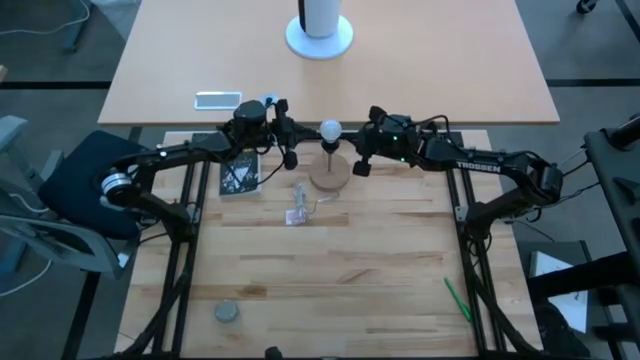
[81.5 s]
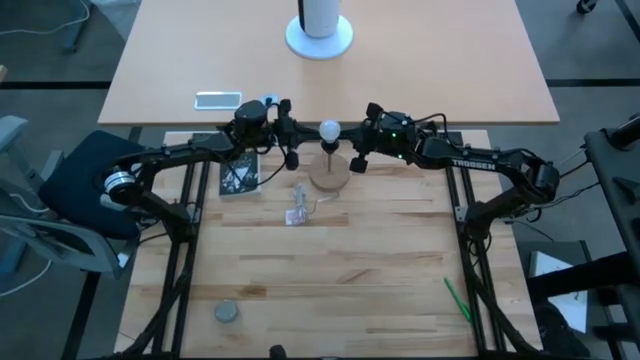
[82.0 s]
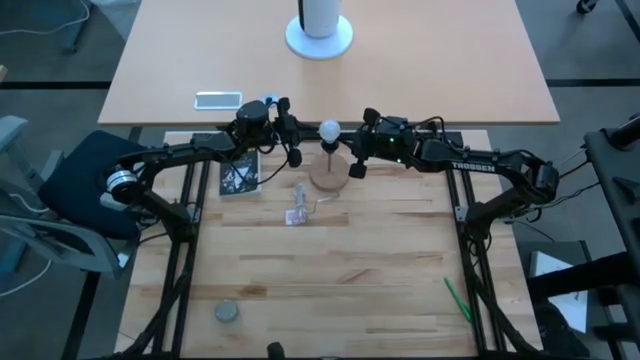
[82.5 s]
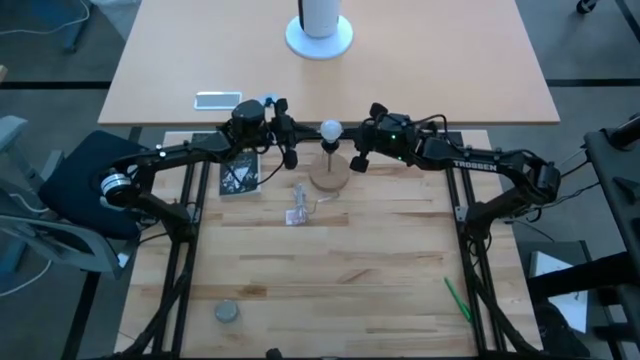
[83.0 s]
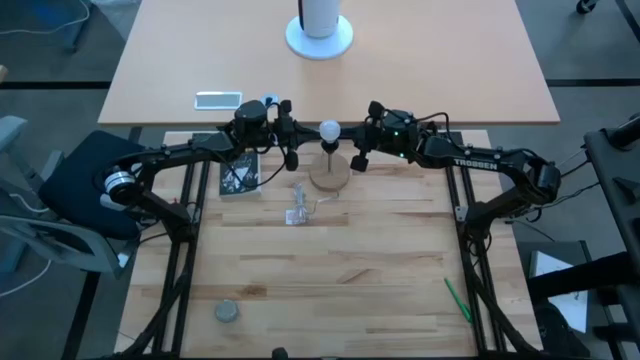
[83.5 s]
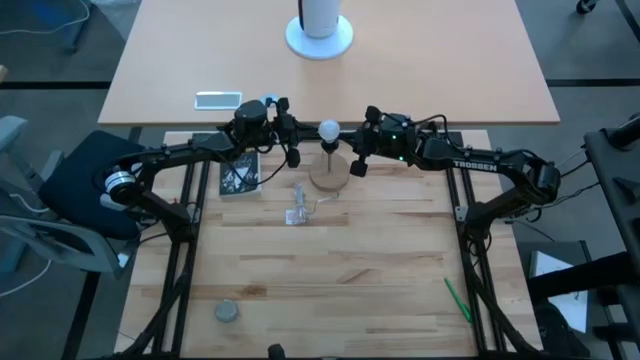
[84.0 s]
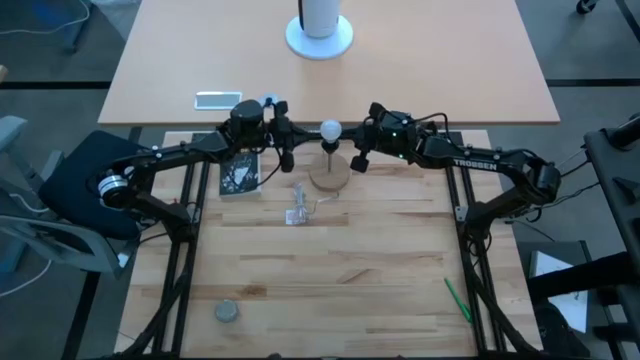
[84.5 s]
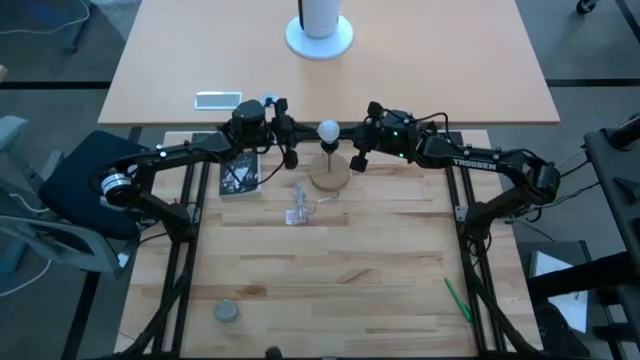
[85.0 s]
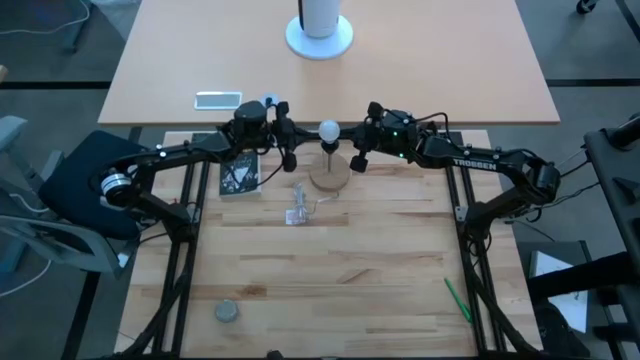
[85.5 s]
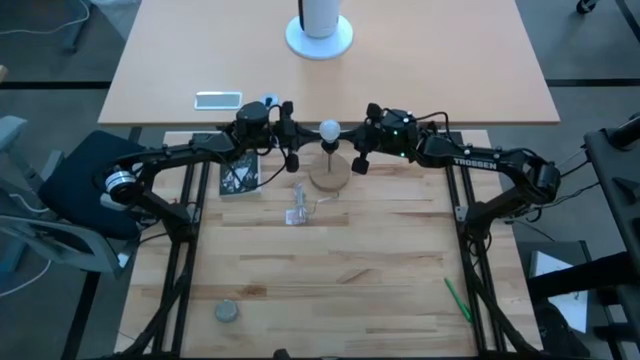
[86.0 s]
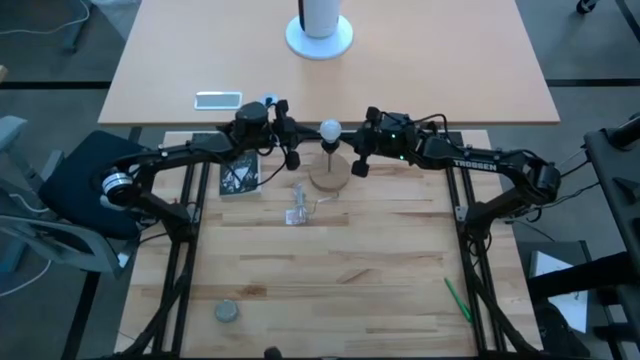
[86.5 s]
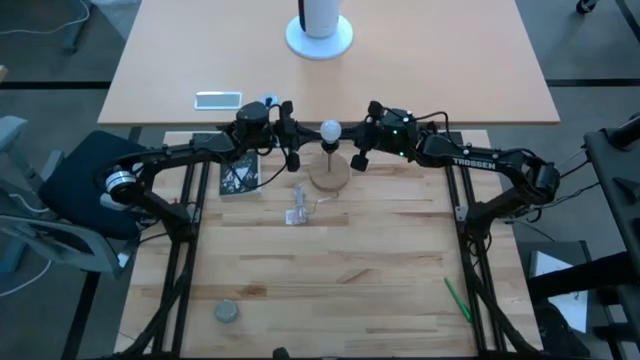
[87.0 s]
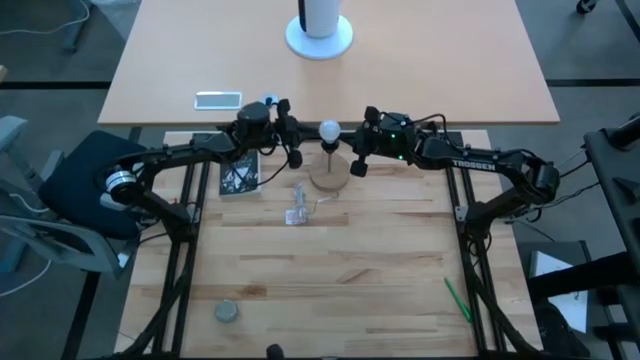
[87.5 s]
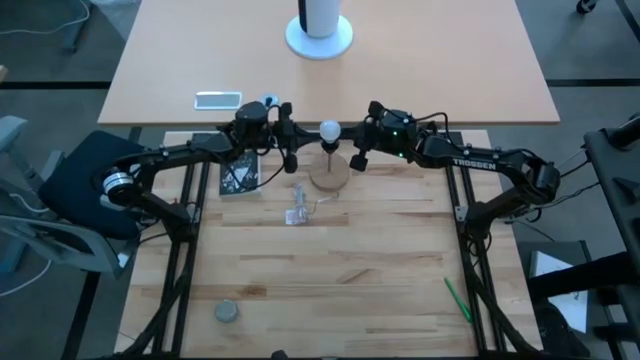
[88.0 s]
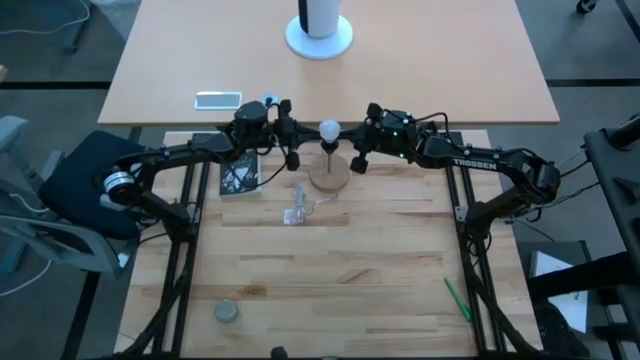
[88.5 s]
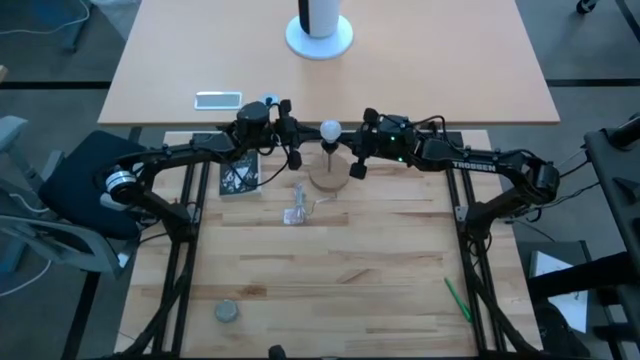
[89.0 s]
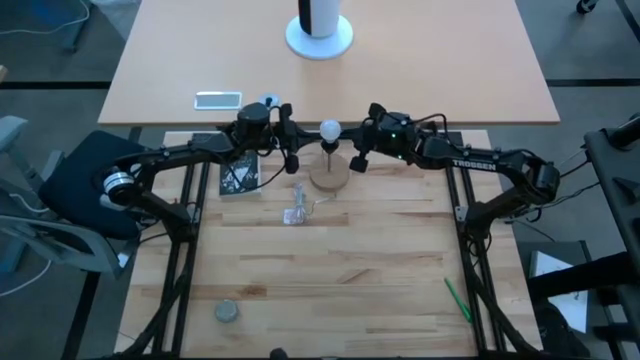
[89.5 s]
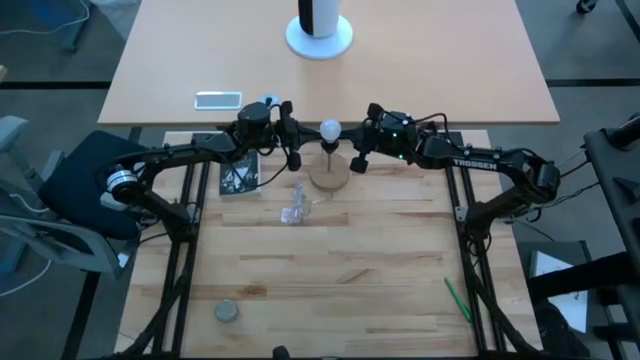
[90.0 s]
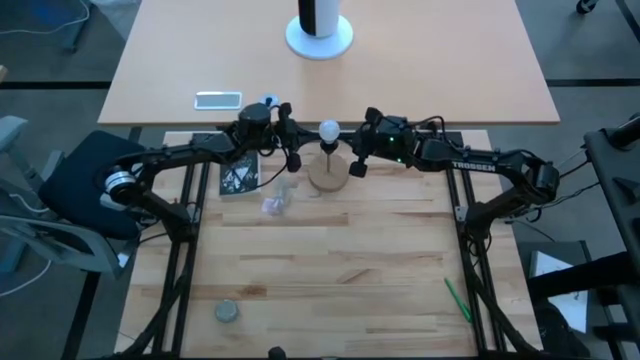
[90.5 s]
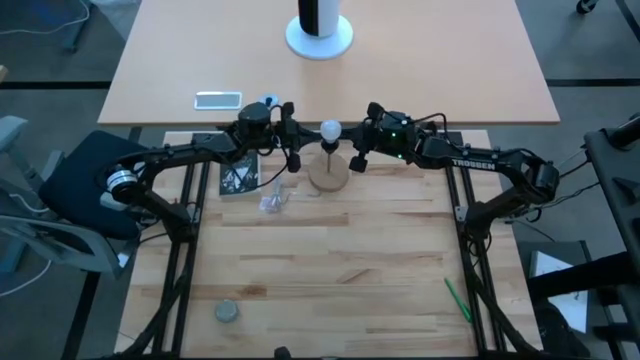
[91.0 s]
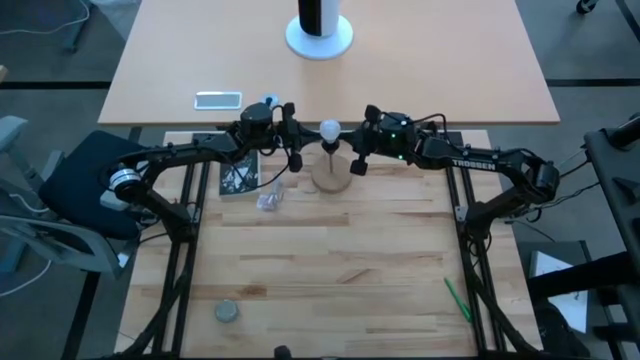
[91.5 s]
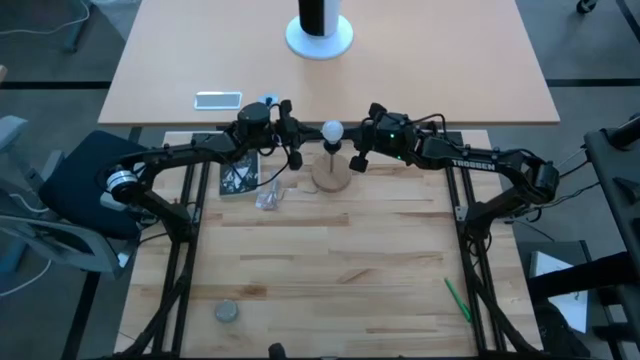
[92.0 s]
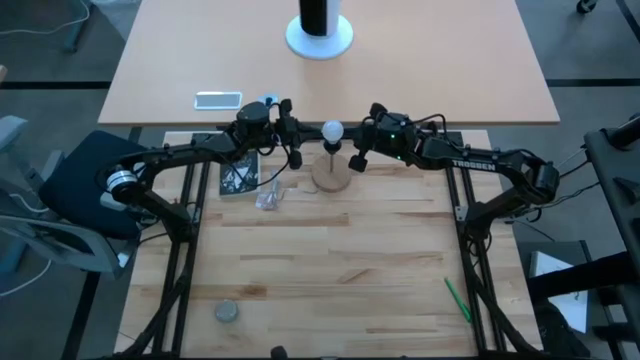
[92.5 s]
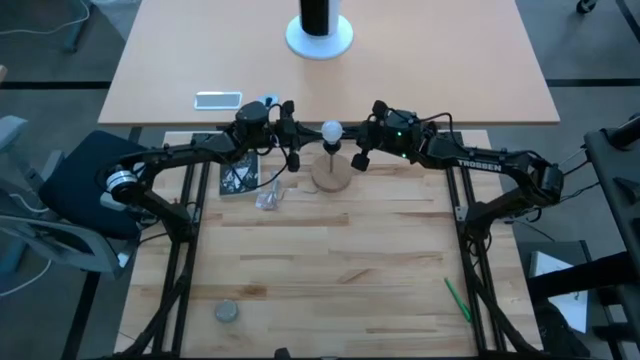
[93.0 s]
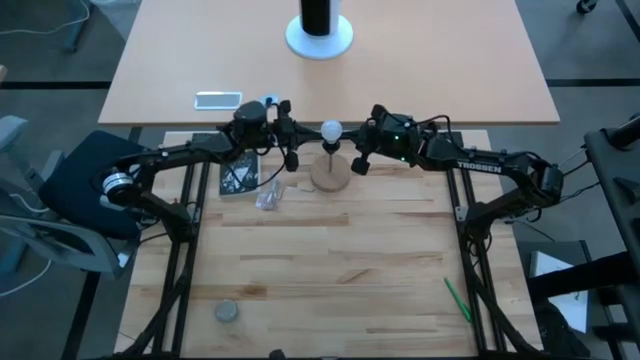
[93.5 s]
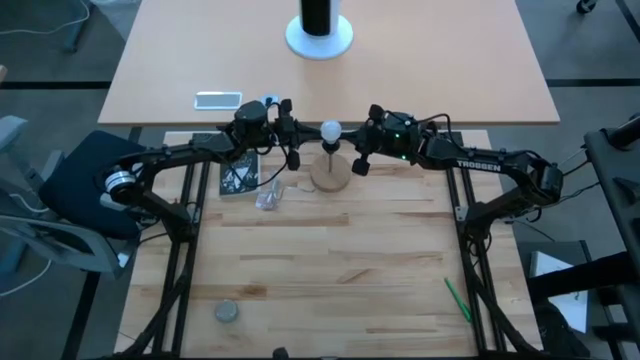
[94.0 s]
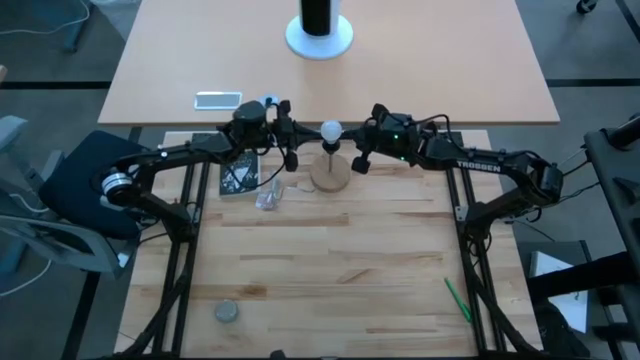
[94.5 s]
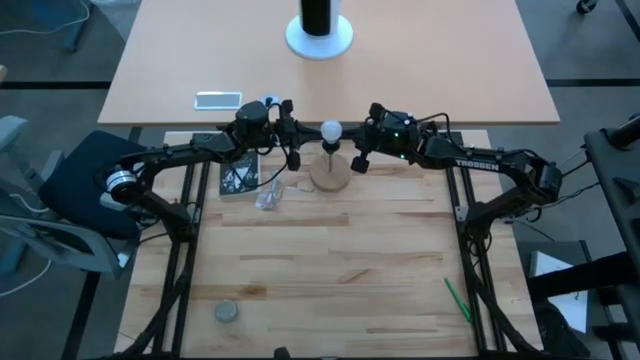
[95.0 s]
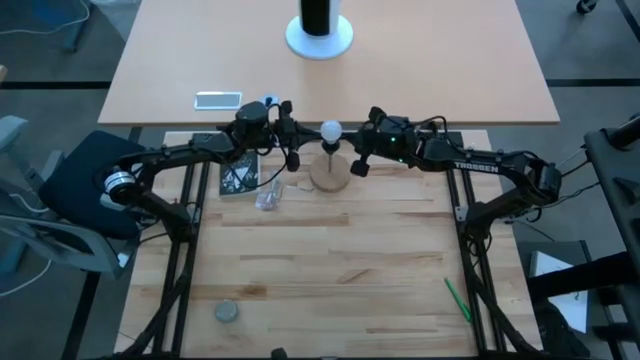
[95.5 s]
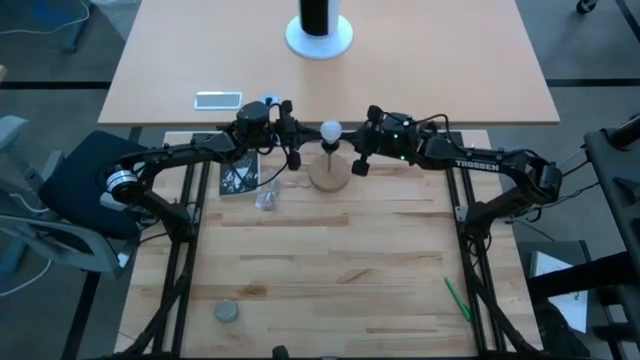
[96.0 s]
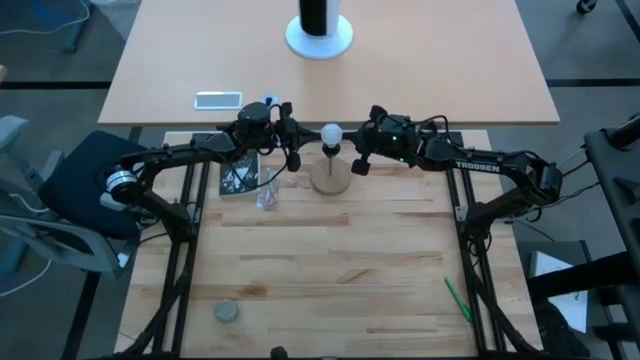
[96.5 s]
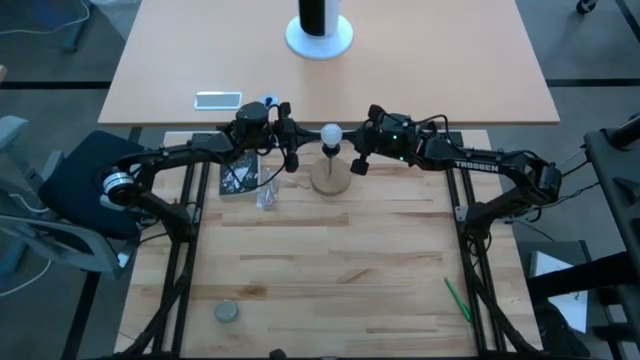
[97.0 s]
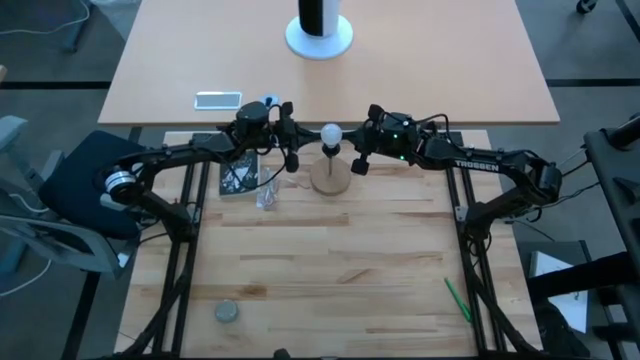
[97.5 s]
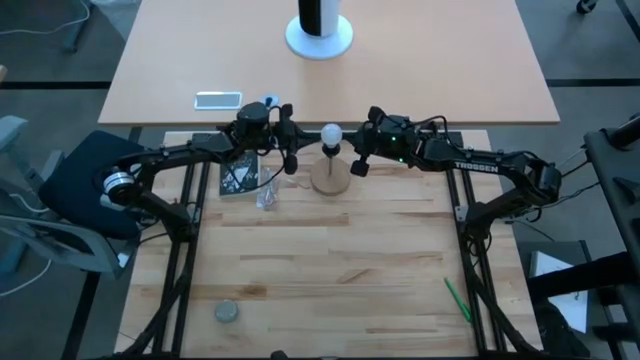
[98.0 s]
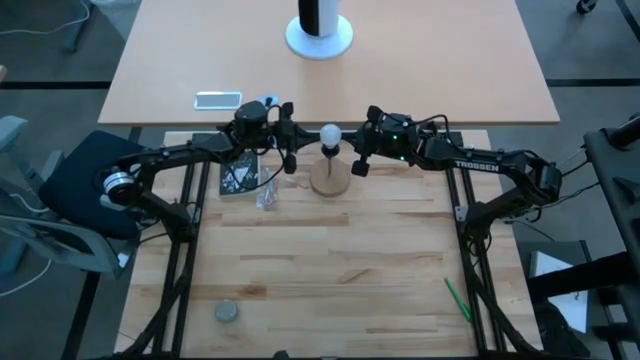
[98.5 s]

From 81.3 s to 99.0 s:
Task: Screw lightbulb
Insert the lightbulb into the black lamp
